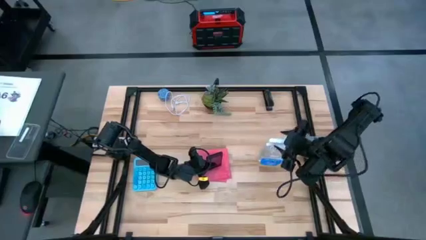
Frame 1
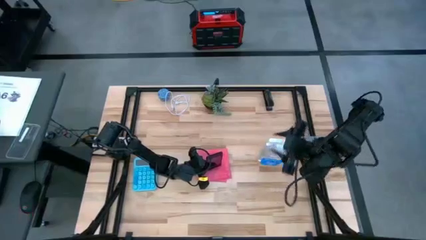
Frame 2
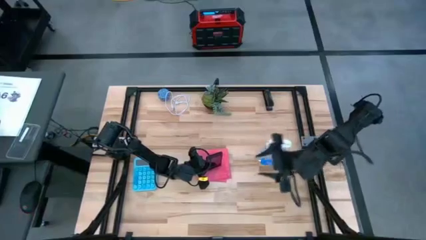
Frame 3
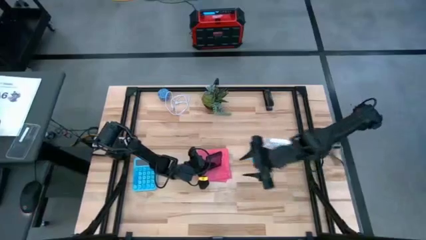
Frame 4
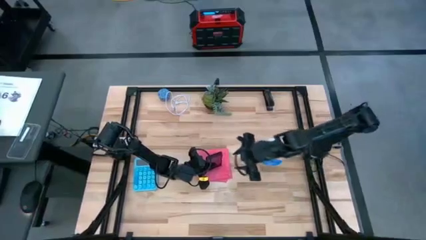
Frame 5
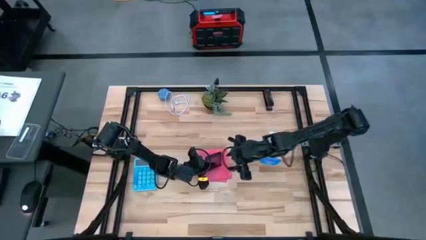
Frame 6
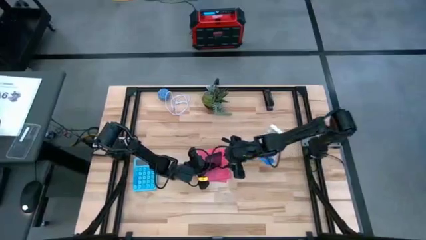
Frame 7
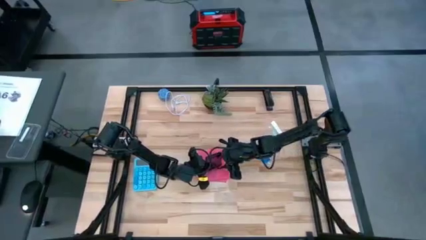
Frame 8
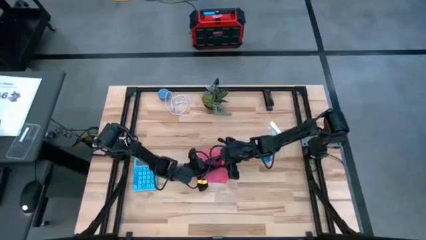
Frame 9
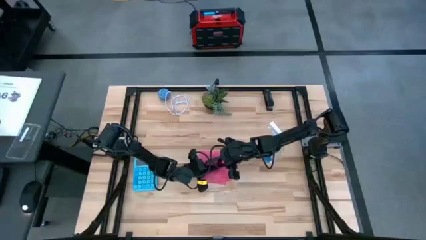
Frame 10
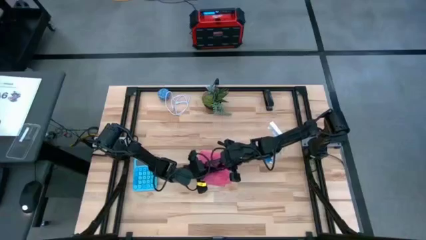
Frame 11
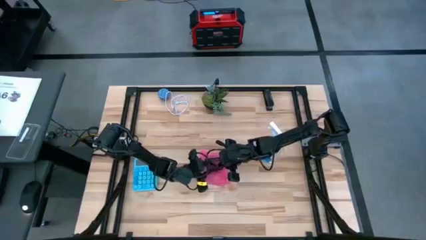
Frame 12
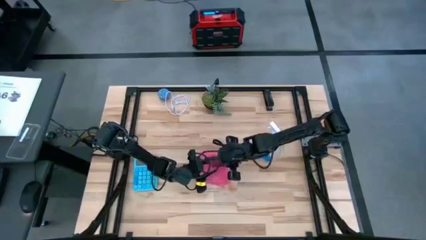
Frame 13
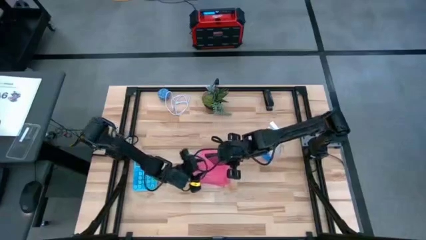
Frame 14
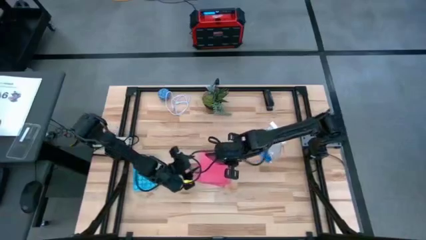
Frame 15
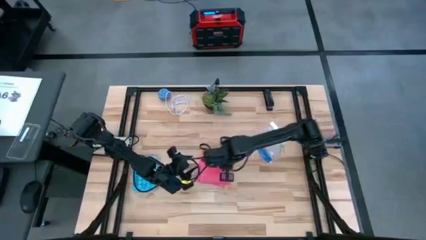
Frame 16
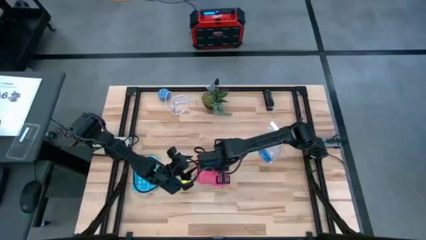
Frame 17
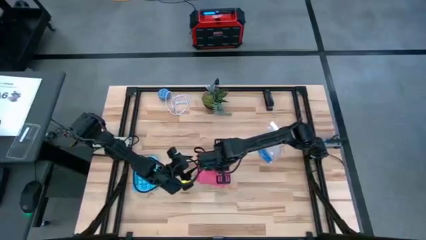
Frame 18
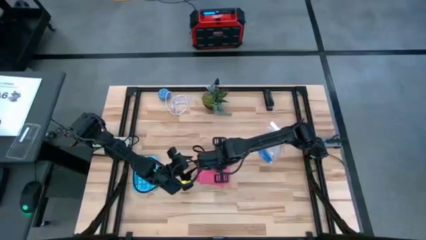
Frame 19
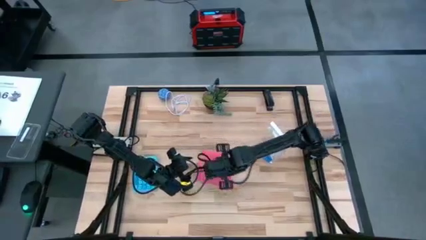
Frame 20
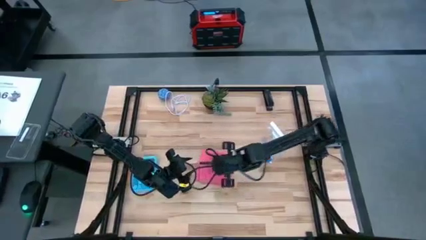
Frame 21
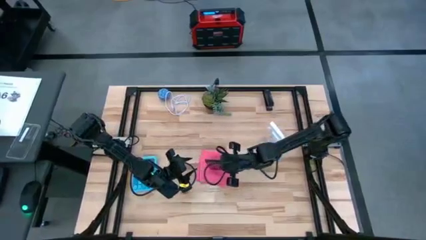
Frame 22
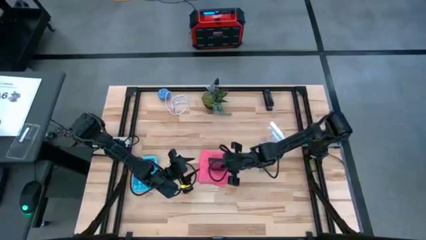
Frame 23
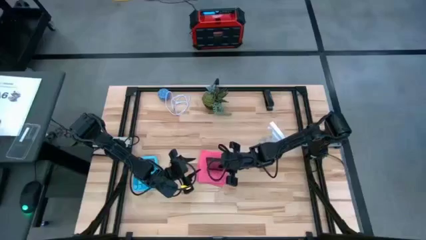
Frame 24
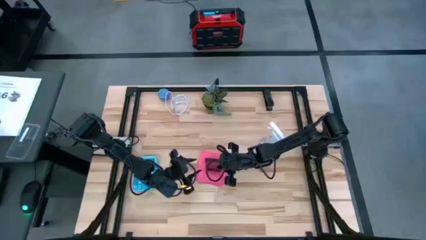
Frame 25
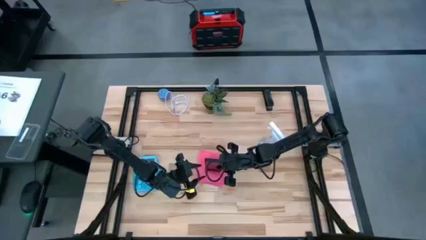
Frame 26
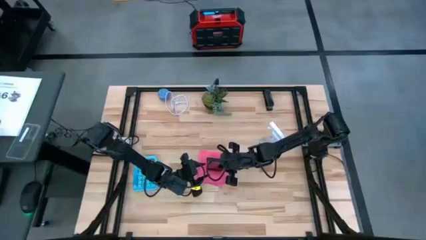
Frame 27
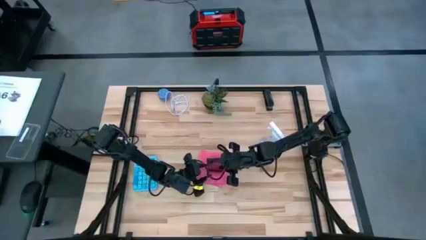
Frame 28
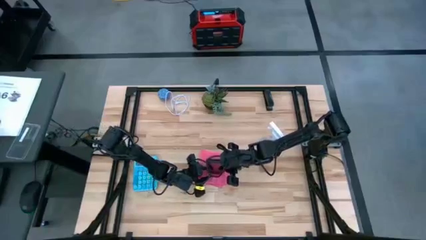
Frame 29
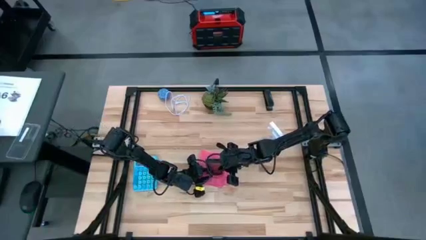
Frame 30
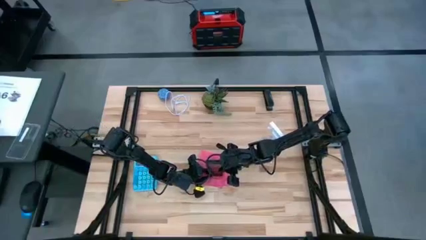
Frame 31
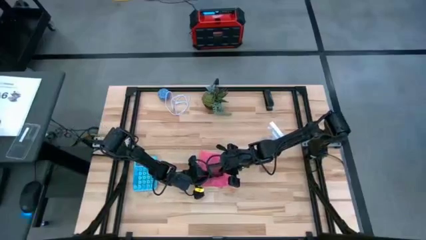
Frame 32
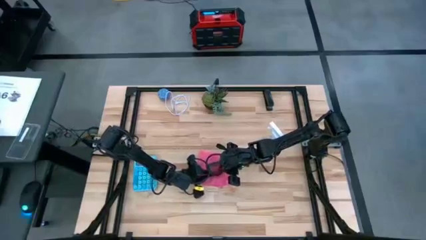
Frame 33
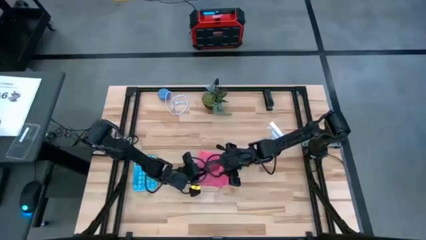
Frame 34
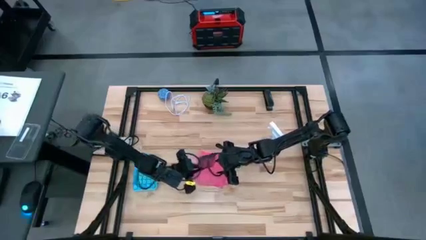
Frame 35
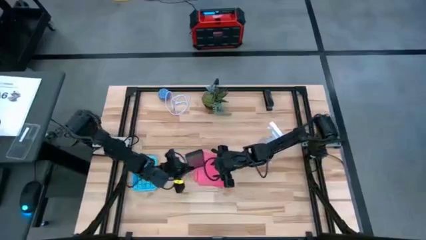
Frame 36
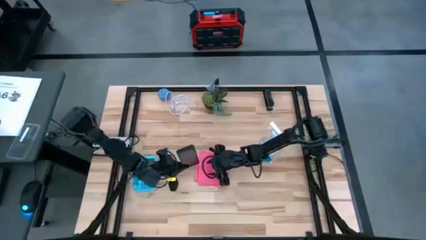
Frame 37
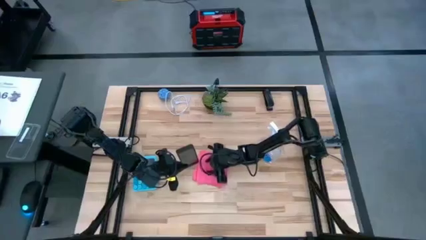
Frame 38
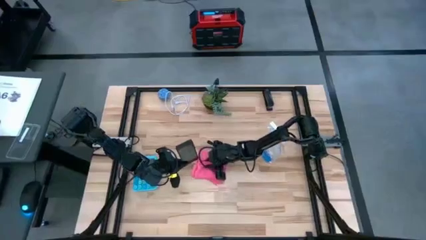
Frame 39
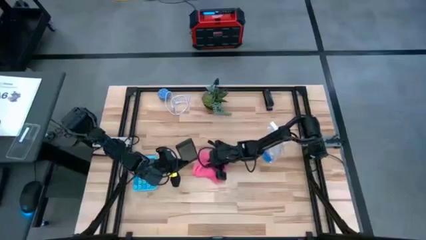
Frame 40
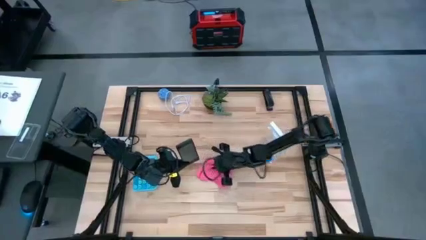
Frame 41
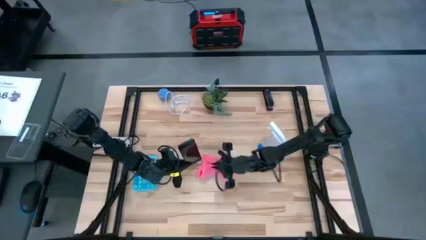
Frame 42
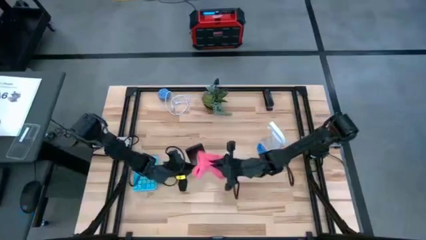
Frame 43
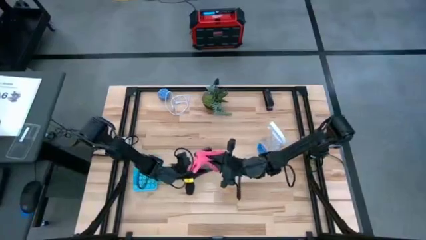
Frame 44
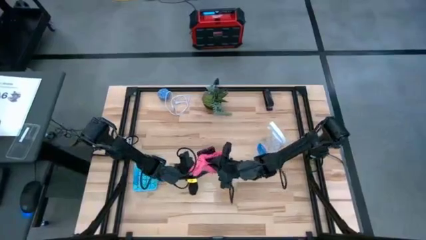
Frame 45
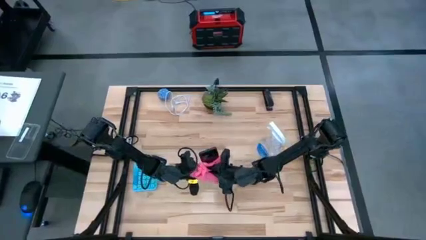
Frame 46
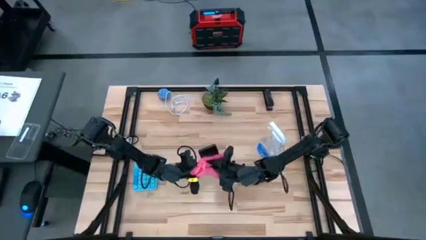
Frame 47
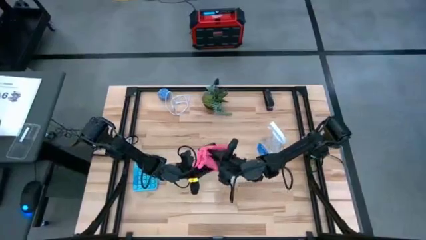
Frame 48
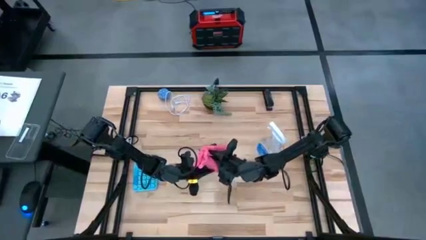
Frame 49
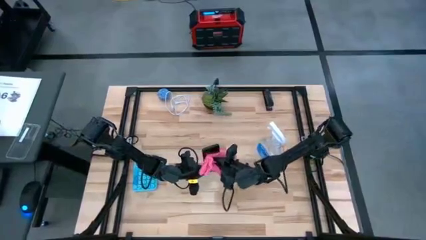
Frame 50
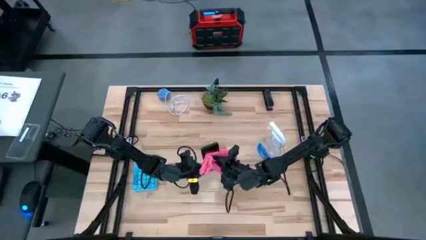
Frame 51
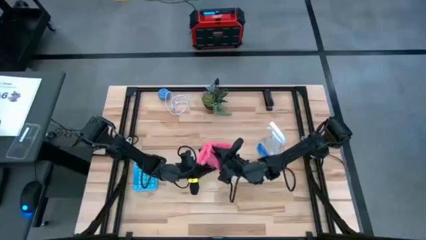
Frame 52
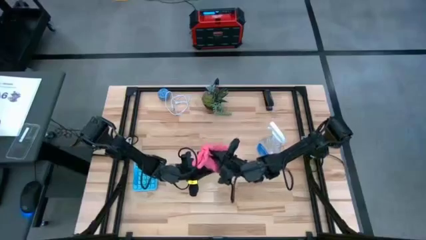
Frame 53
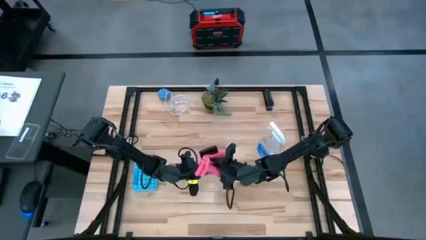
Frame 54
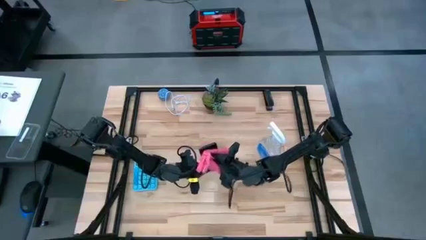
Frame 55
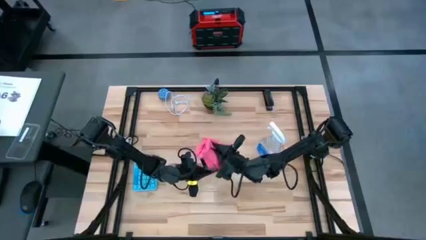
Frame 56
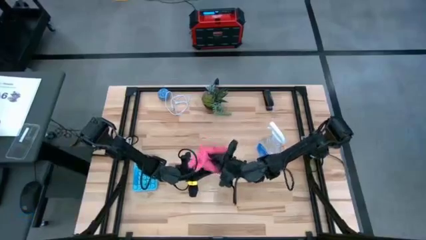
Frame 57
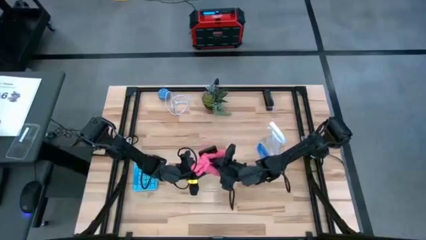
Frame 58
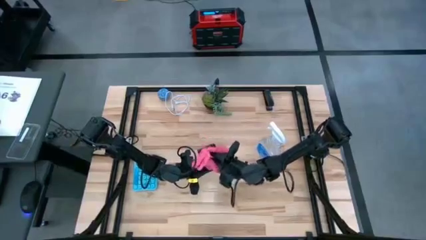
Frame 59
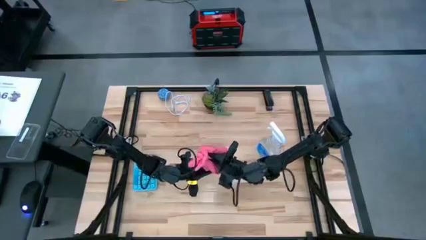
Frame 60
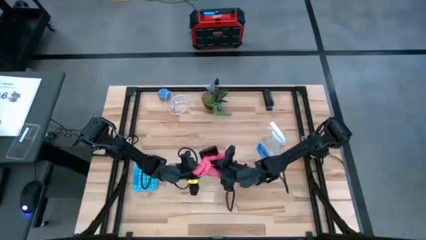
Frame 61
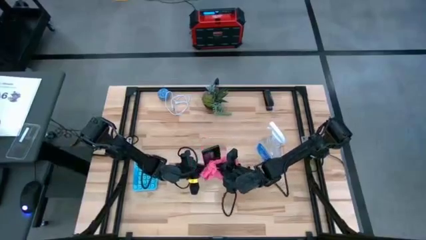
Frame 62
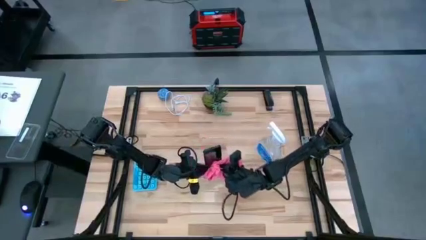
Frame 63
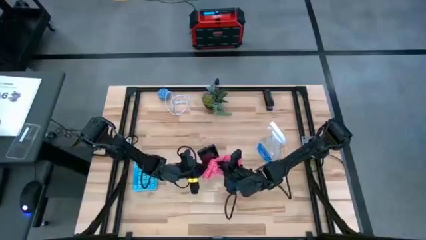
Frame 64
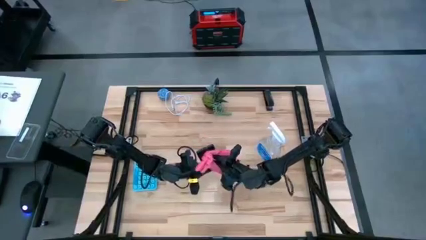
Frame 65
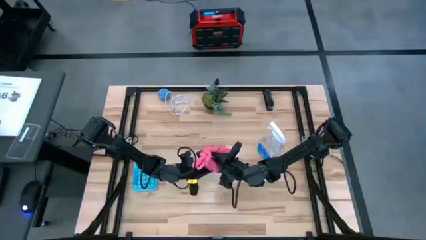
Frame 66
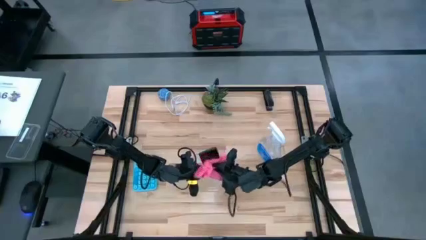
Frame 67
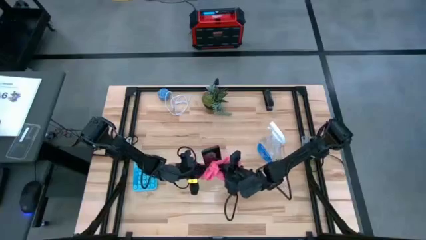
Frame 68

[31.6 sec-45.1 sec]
Task: Apply microfiber cloth
Wipe the front of the cellphone with a microfiber cloth

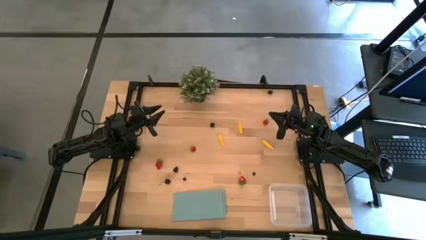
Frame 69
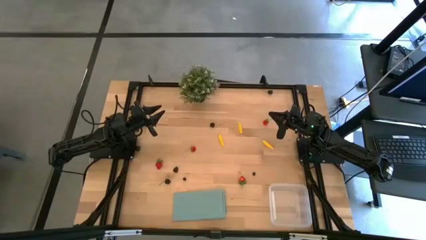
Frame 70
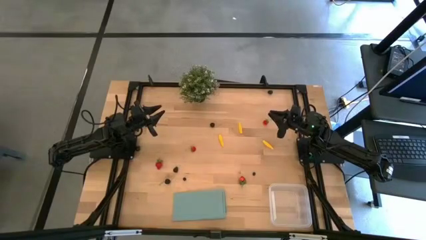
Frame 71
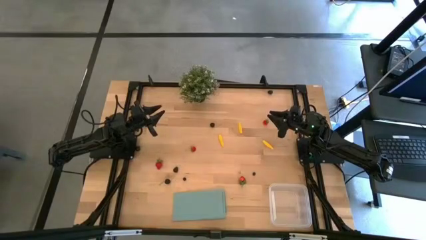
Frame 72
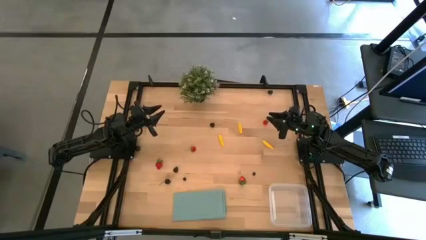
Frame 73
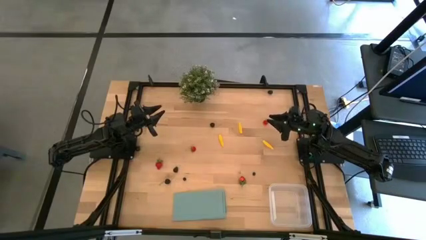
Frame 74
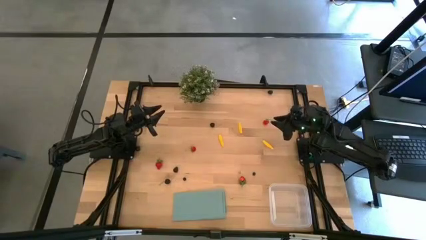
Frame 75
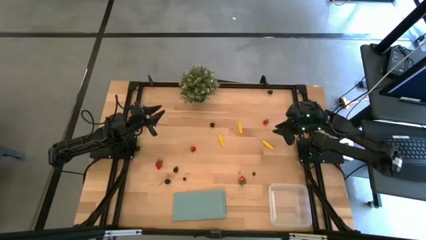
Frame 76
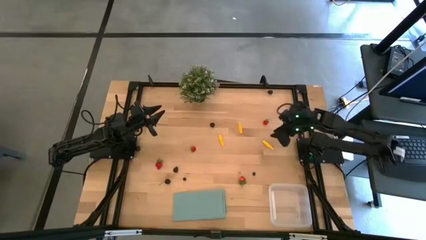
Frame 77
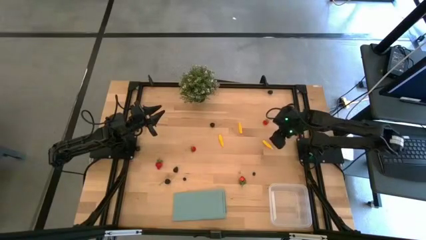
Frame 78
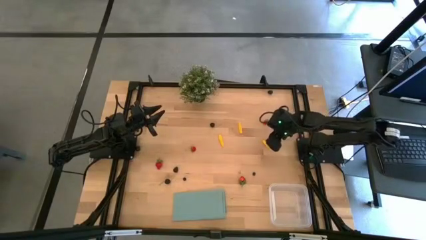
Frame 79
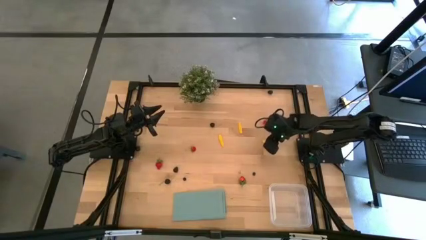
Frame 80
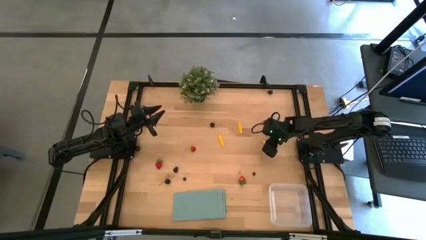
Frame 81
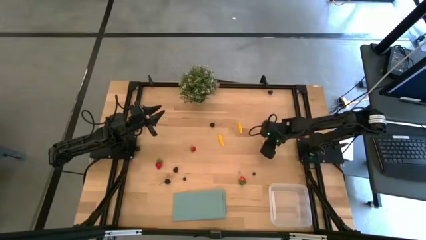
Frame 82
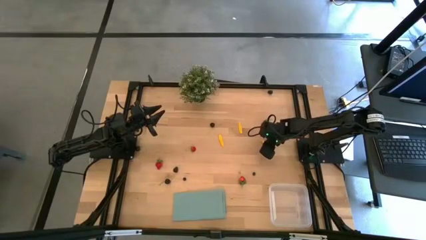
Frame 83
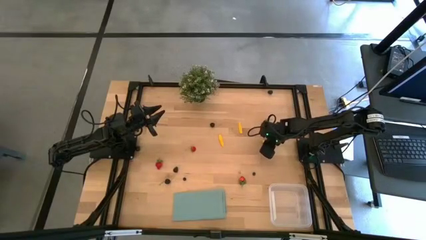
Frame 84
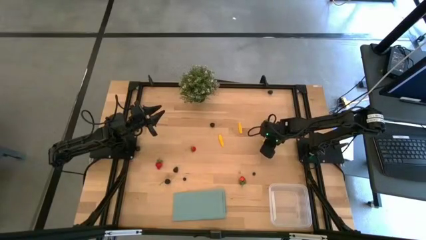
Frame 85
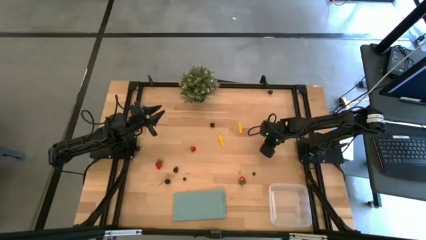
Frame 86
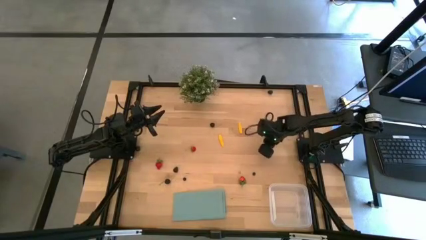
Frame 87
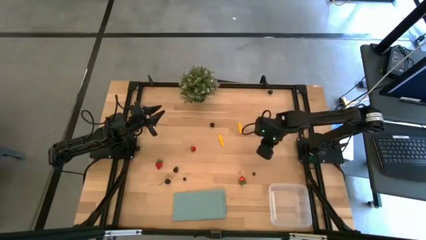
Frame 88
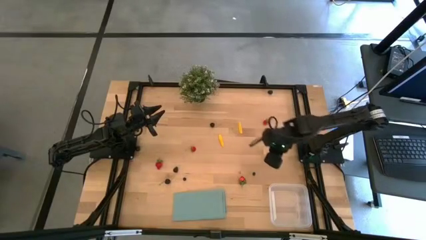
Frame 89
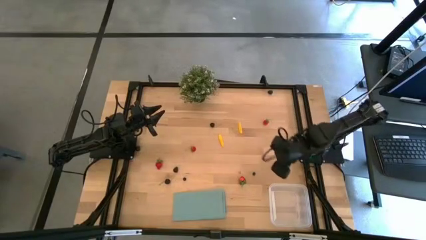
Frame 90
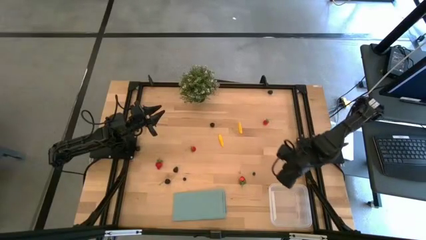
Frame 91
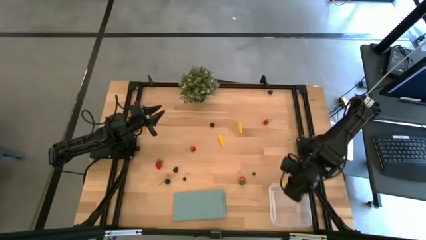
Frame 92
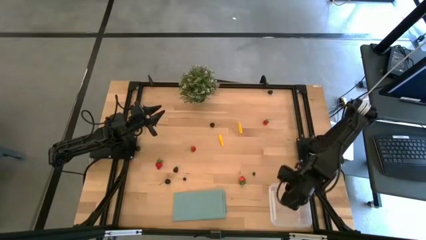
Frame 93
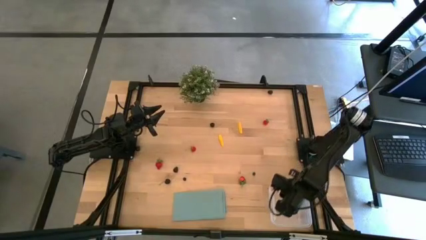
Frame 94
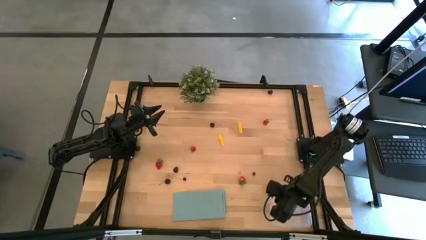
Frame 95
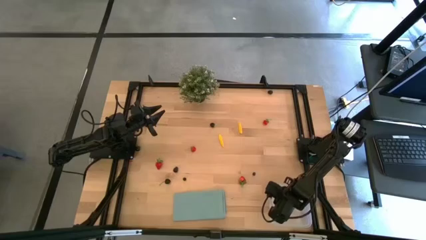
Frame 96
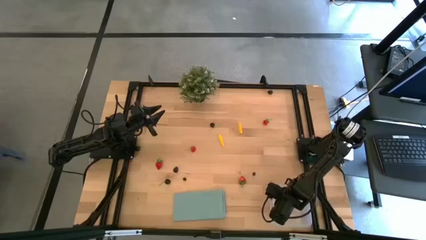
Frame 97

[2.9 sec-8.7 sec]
Task: Pick and placing Produce into tupperware
Put the yellow corn into the transparent bin
